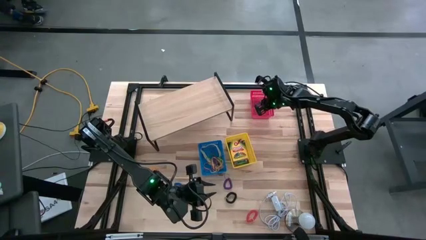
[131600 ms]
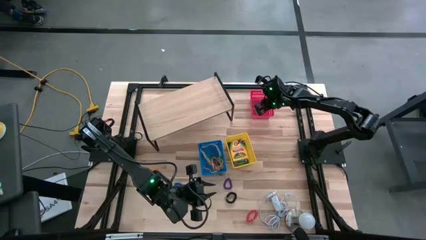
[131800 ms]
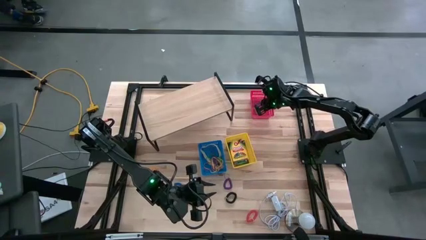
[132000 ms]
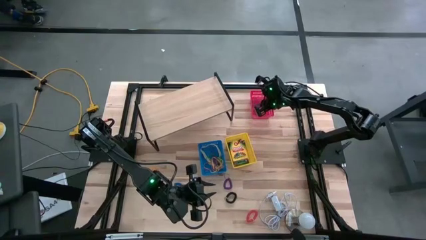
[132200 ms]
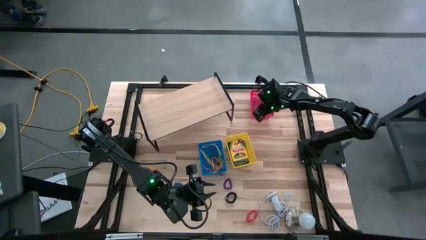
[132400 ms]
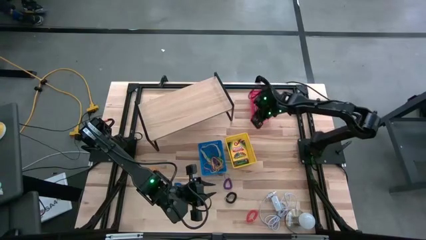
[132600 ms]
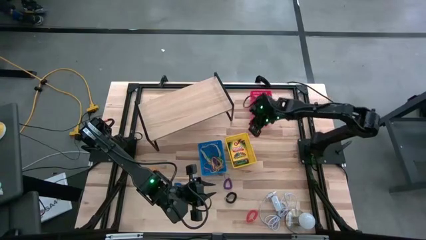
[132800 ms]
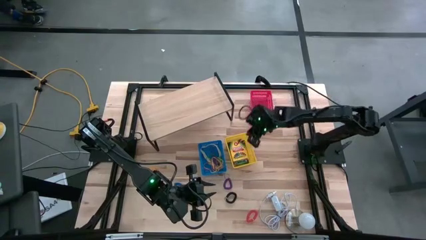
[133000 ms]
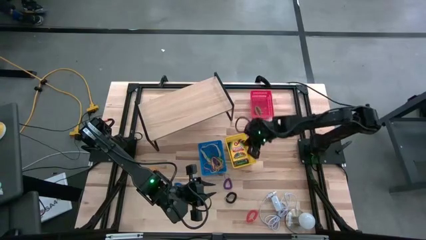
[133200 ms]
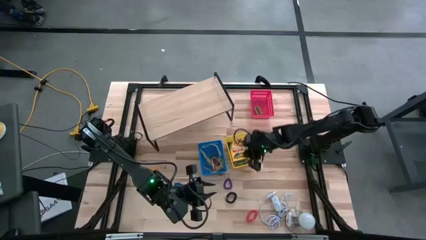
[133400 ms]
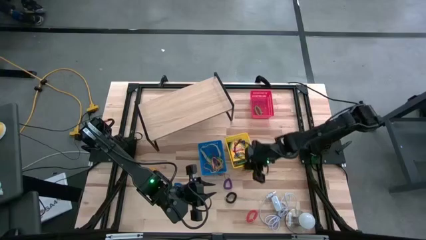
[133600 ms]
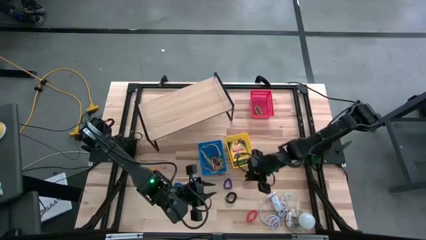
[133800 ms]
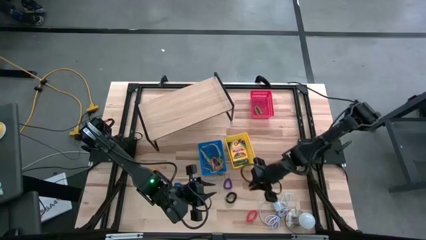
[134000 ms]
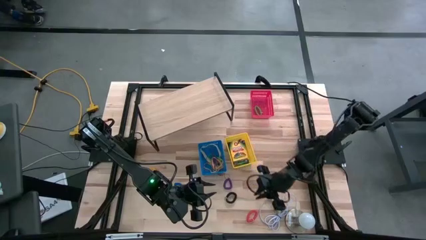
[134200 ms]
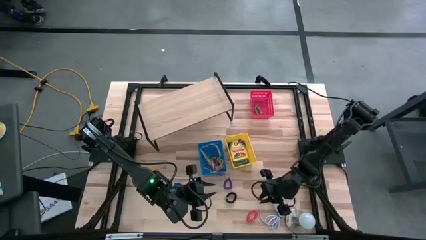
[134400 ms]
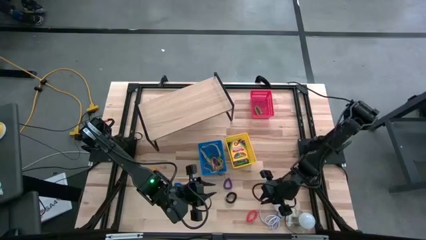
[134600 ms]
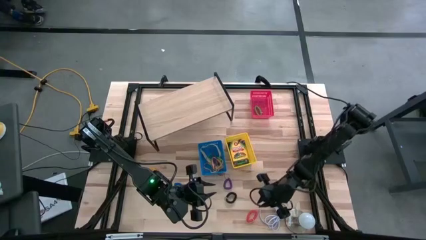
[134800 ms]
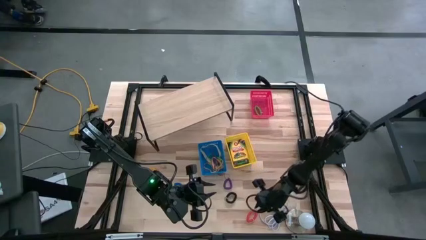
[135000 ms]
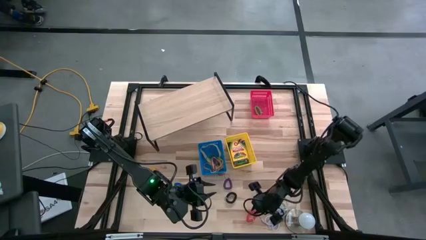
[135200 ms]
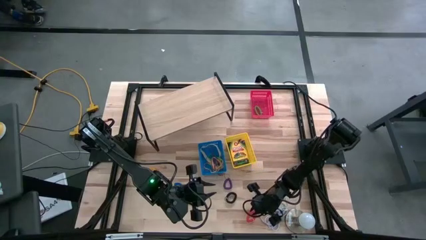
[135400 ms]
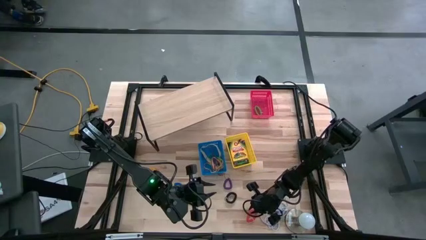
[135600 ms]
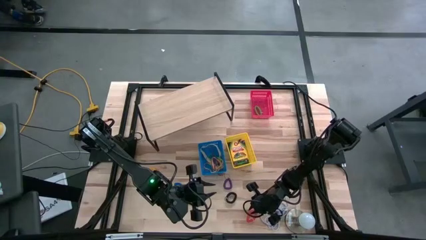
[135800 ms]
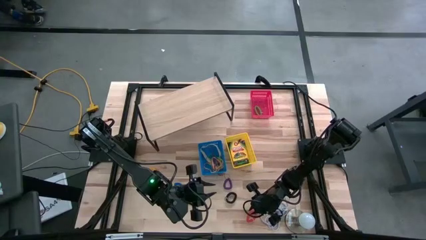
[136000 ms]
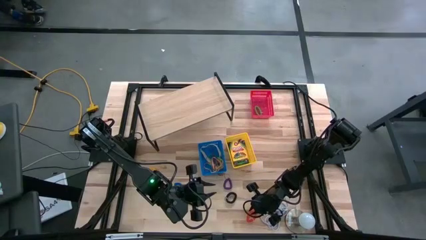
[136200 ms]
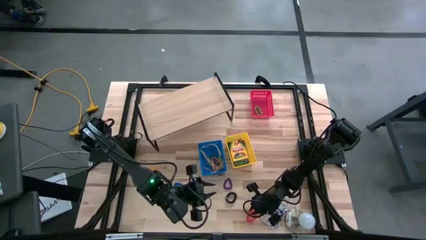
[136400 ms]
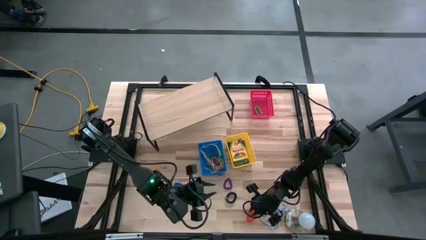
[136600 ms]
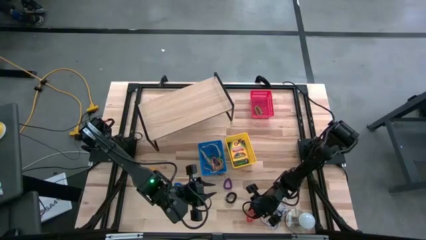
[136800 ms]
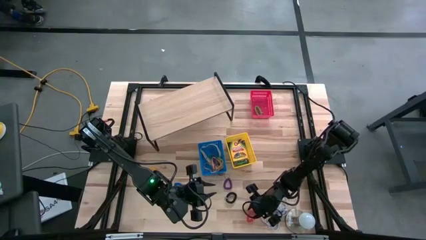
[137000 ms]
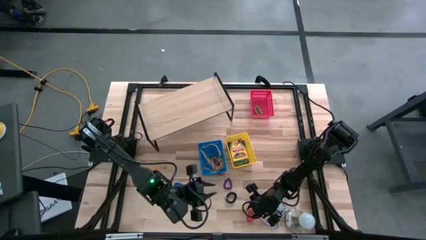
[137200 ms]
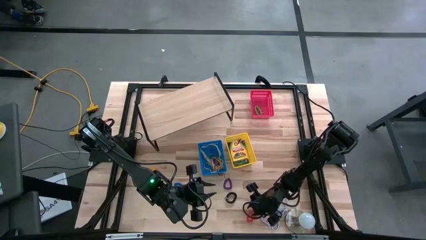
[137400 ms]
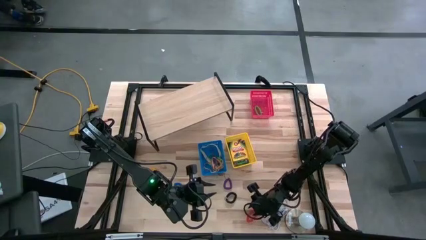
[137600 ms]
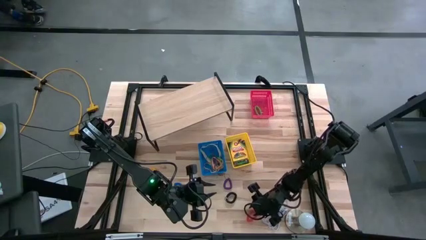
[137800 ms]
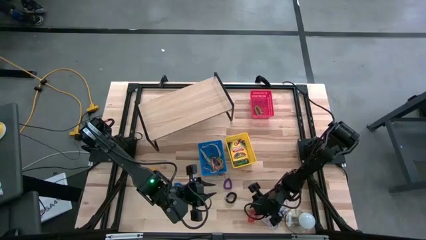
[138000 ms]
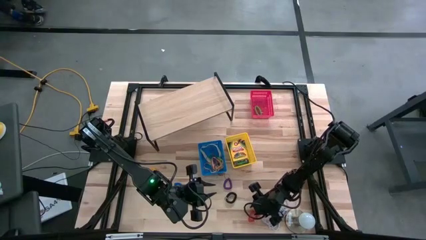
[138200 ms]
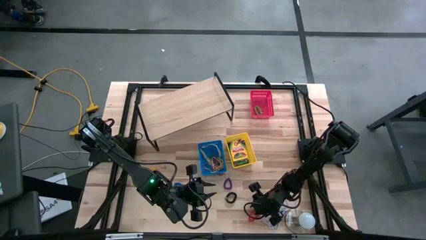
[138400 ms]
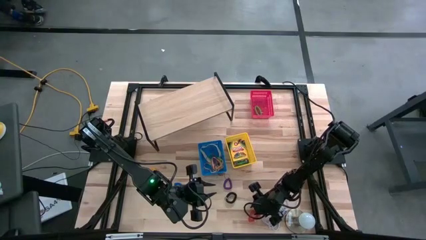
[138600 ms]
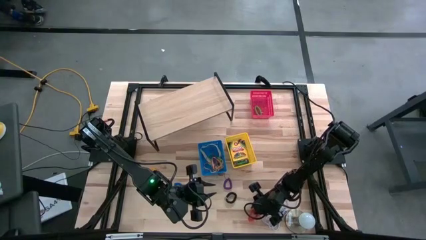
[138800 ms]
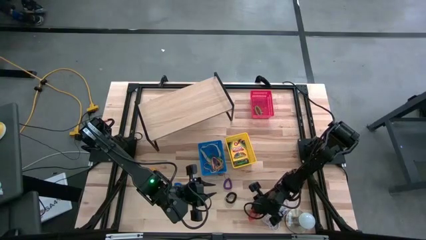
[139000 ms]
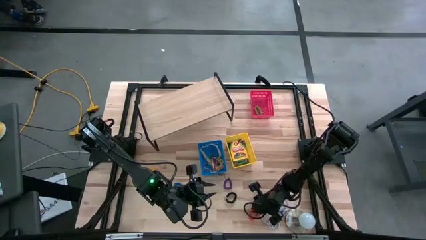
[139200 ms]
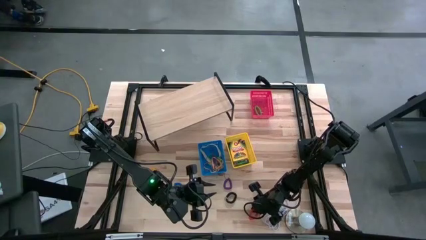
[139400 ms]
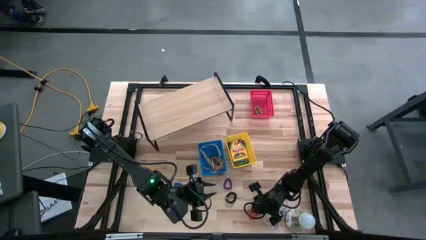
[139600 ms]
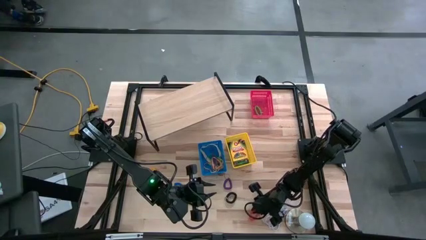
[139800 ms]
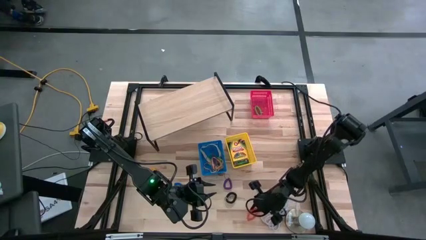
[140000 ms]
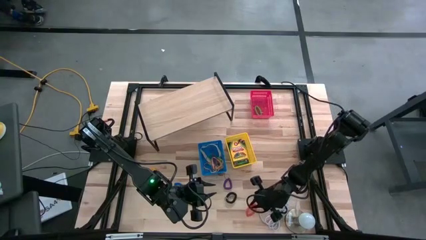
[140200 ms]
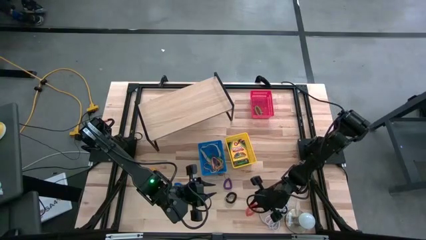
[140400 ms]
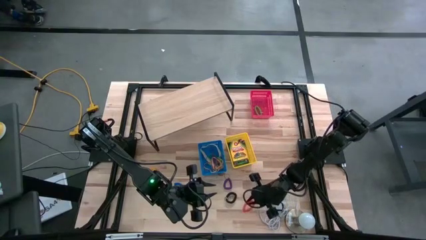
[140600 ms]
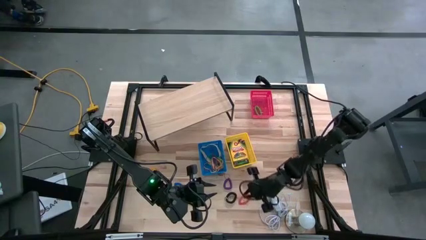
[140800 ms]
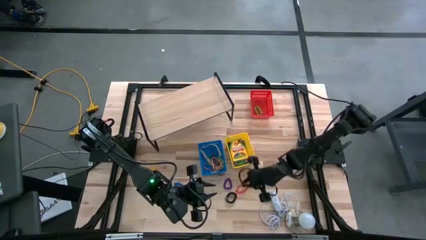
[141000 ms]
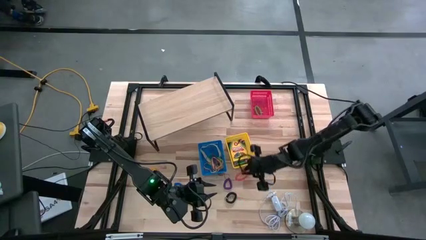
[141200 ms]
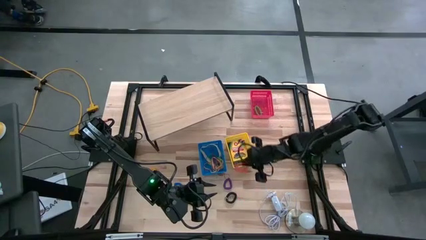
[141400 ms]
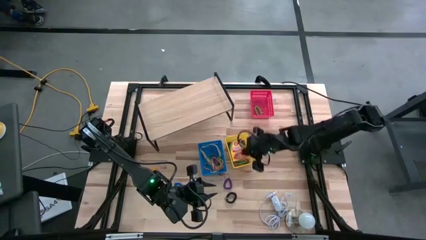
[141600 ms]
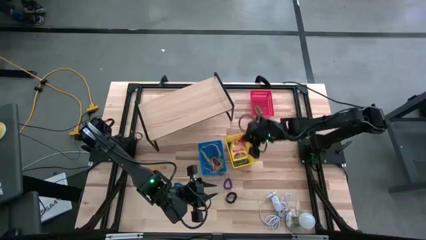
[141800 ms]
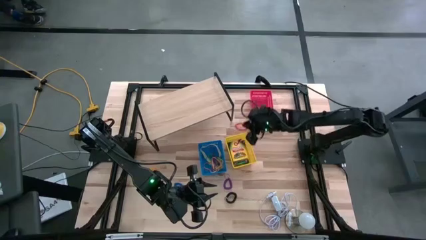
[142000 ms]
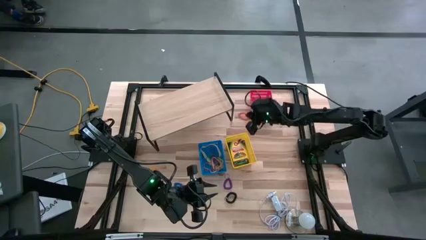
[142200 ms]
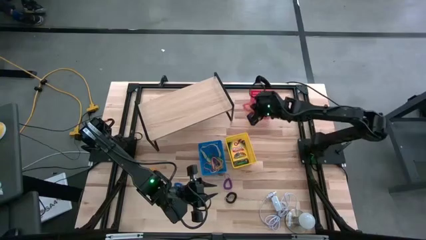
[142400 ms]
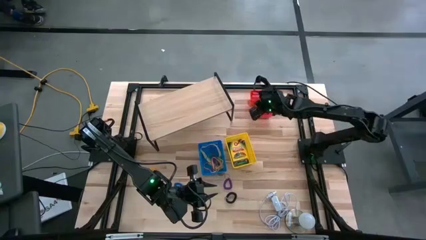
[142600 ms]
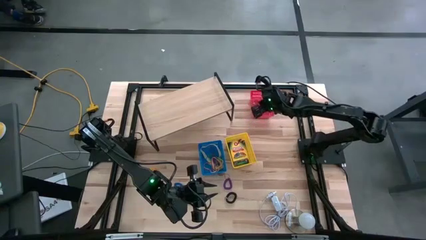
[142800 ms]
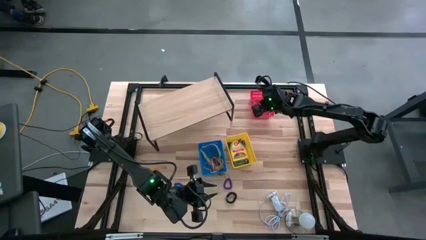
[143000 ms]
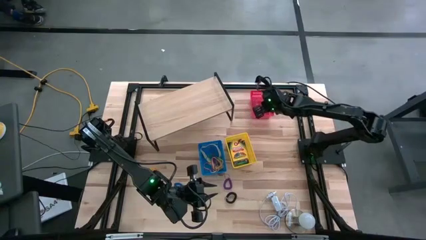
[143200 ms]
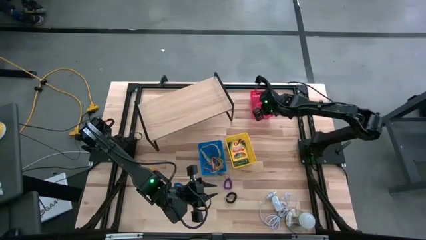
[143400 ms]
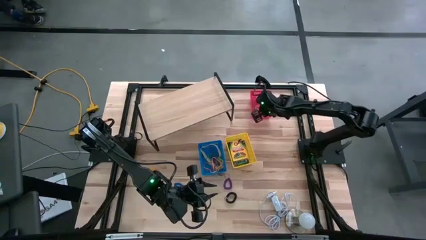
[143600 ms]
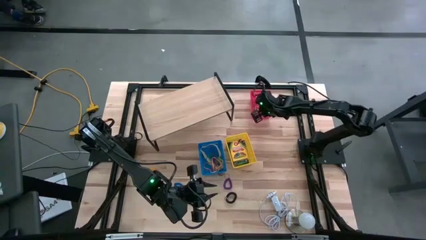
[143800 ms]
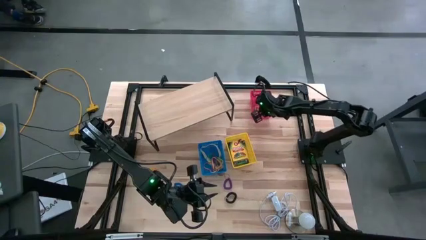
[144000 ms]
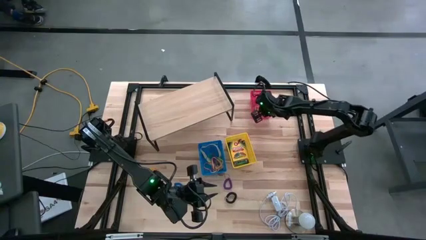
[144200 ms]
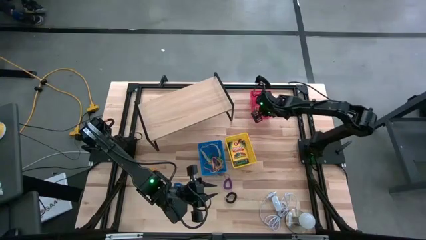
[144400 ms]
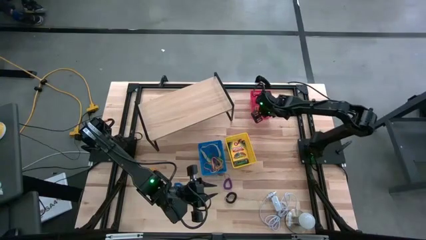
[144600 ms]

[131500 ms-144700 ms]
Task: Pick & Place Office Desk Supplies
Put the red spring keychain into the red bin
